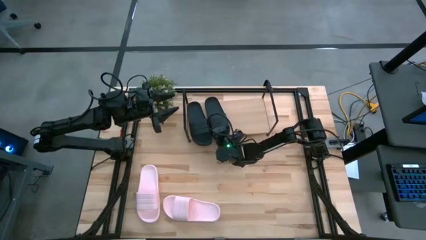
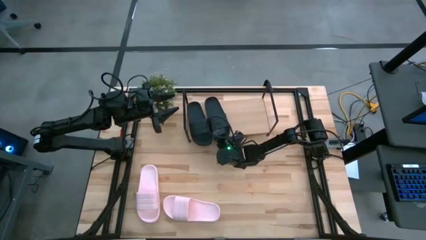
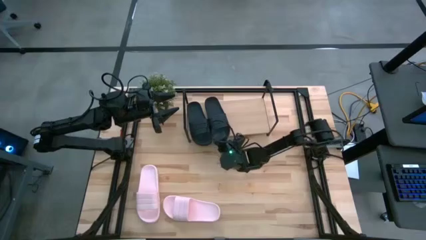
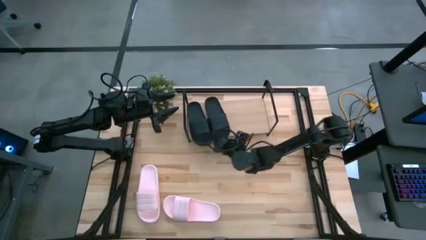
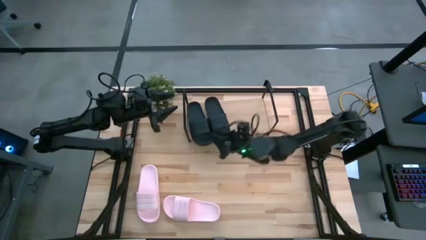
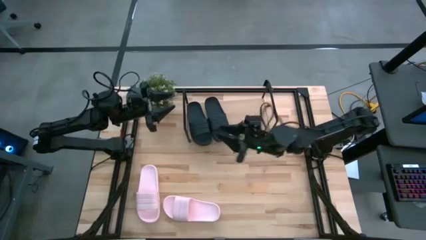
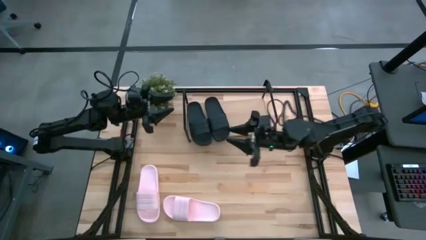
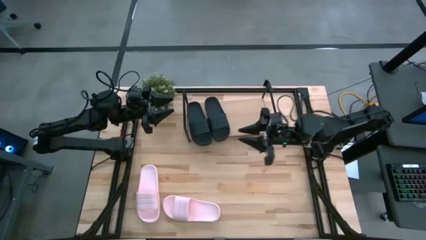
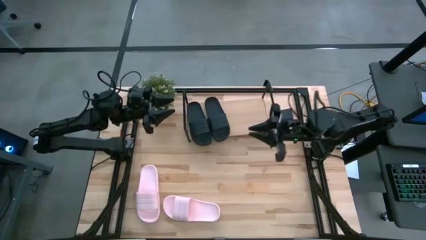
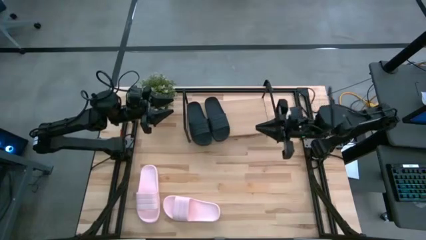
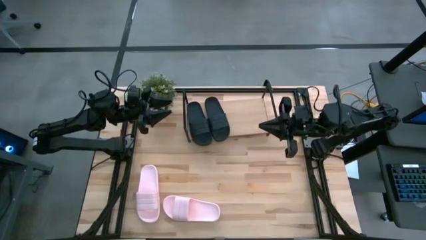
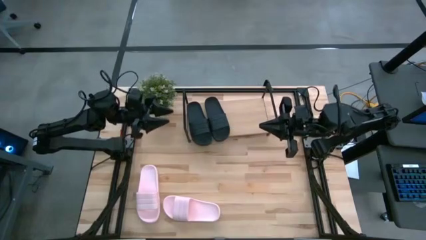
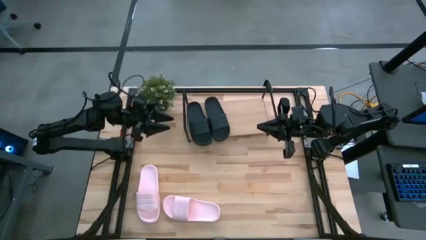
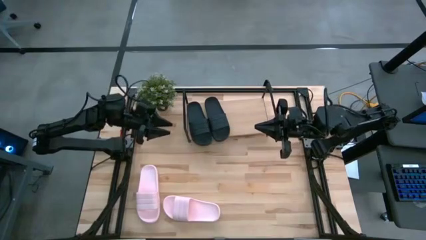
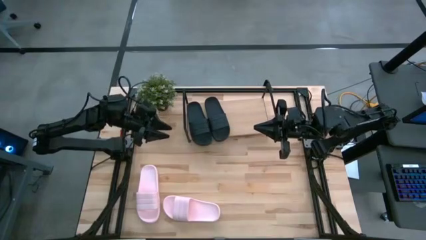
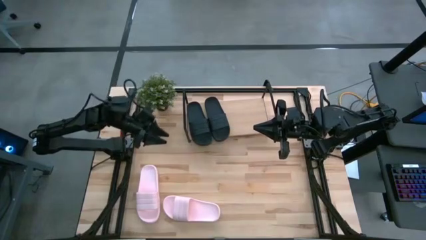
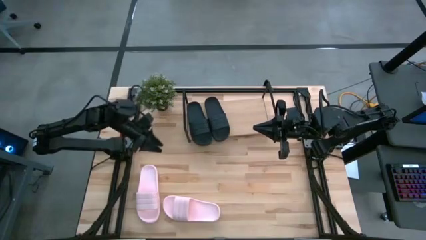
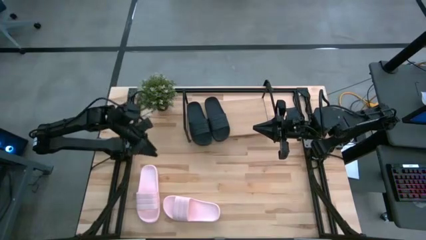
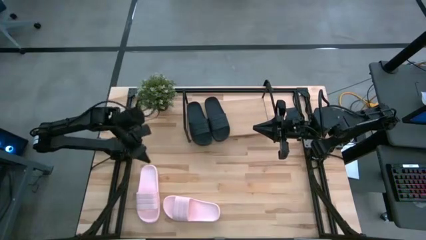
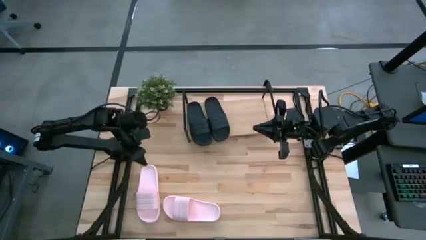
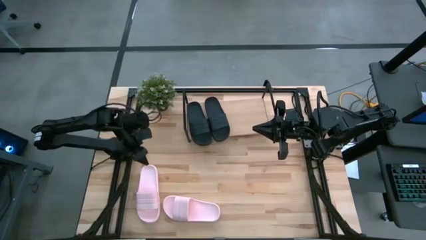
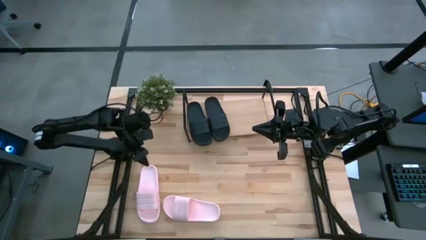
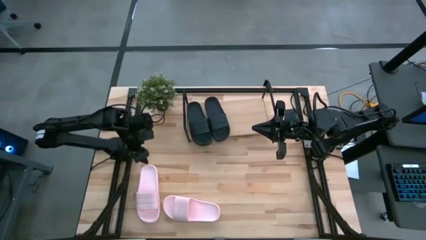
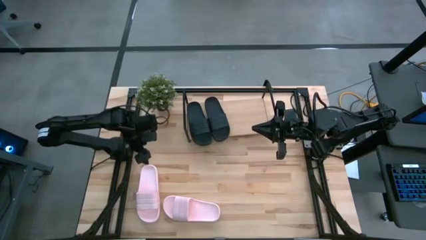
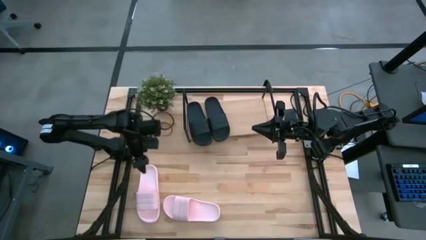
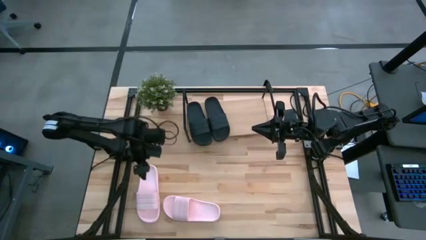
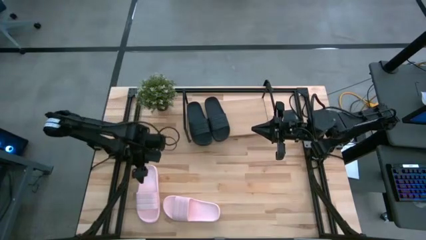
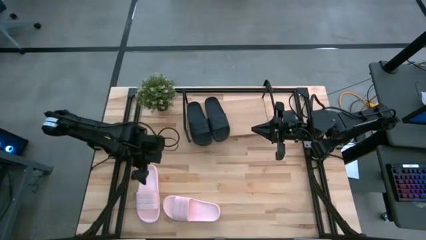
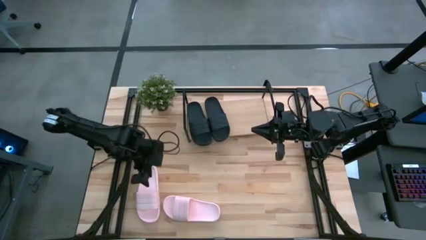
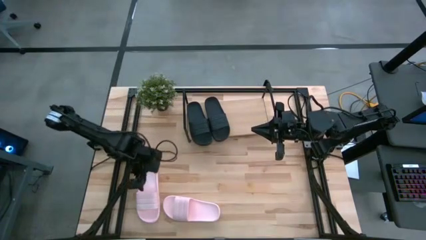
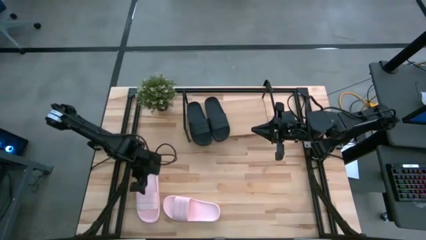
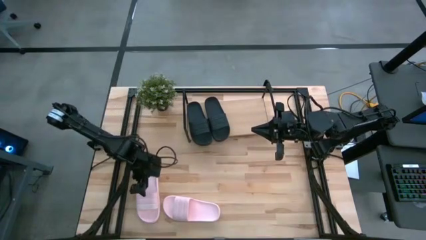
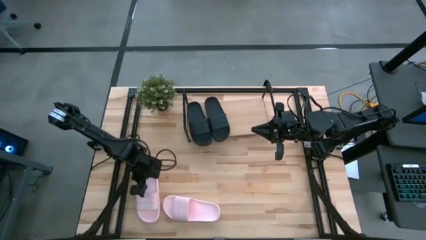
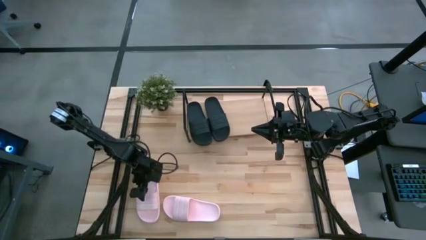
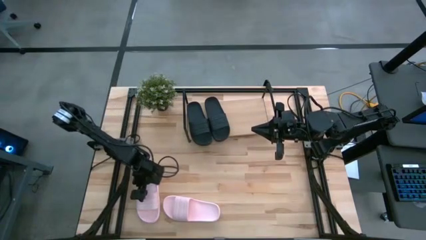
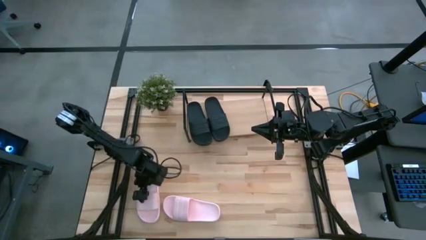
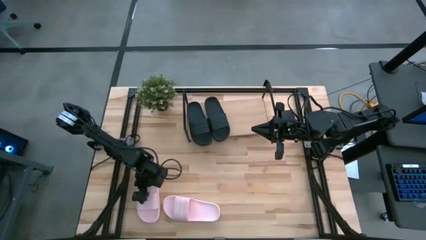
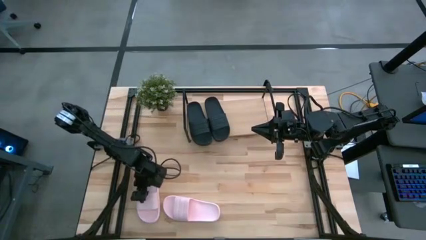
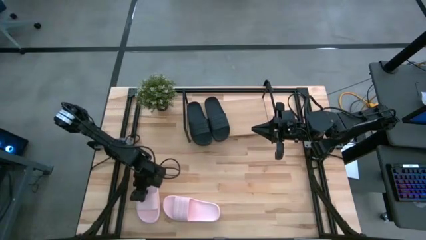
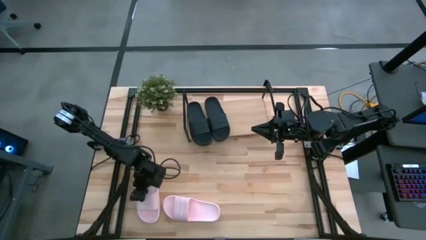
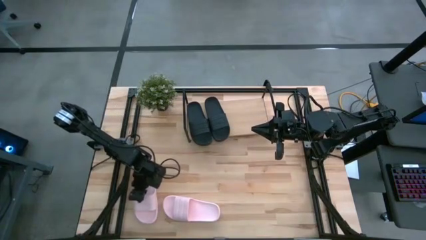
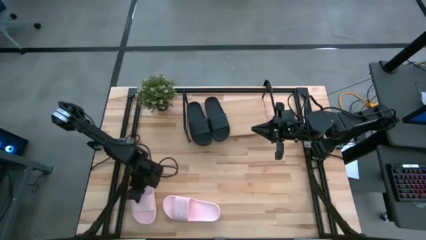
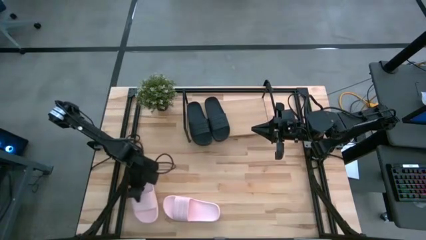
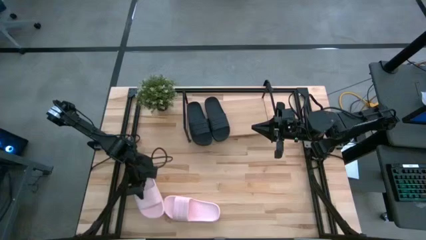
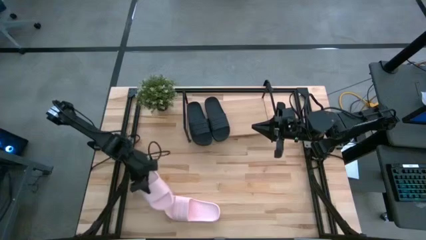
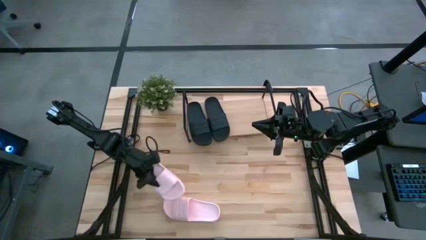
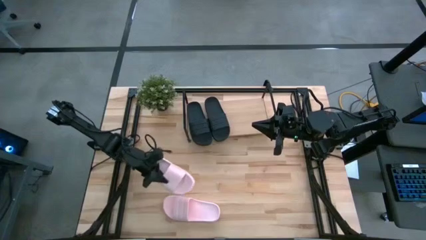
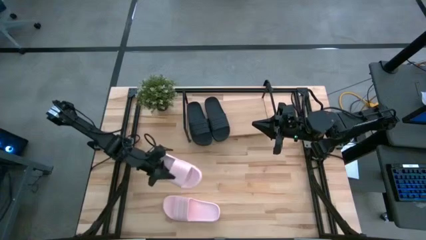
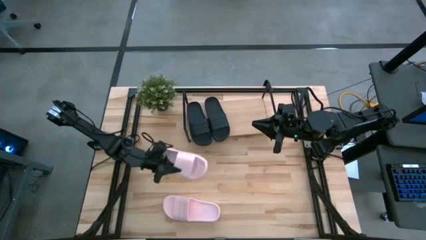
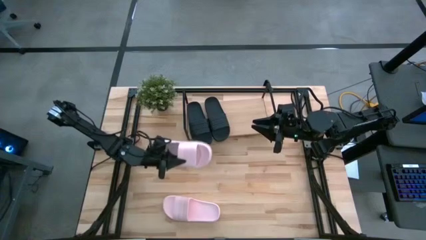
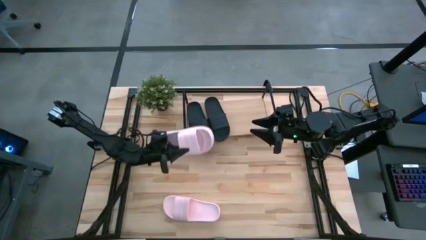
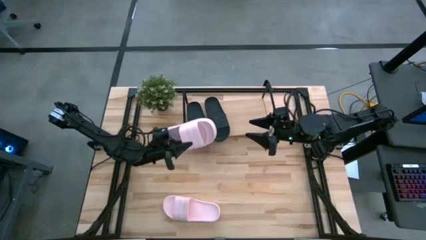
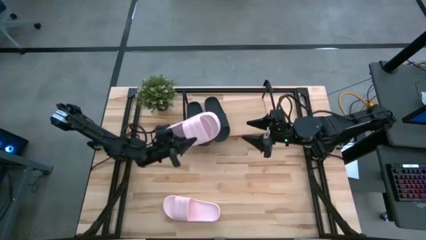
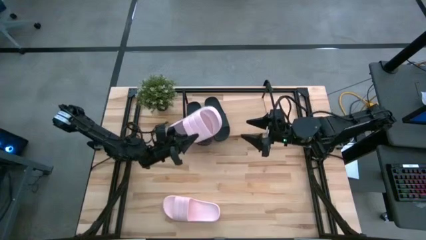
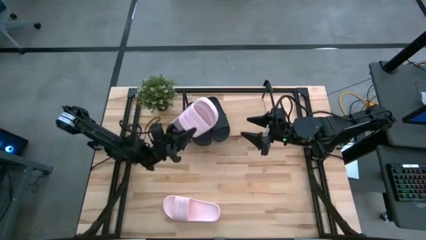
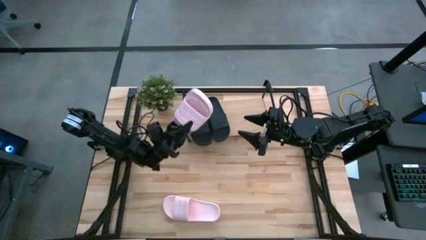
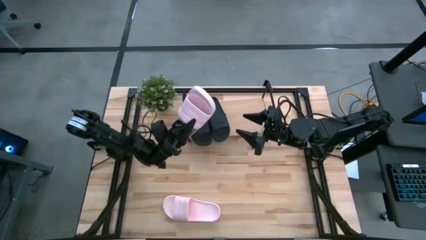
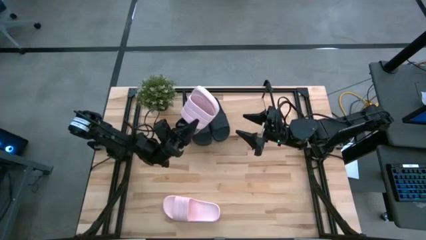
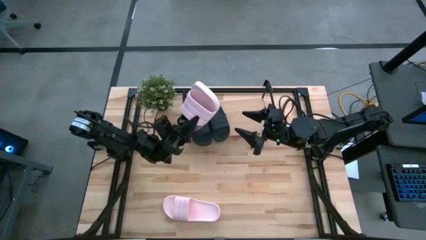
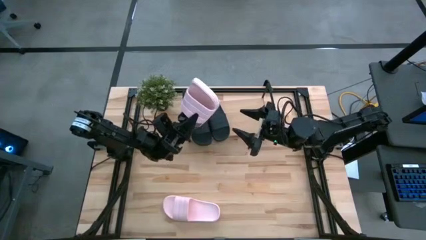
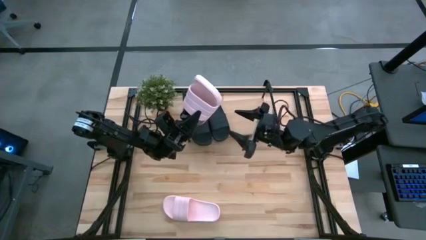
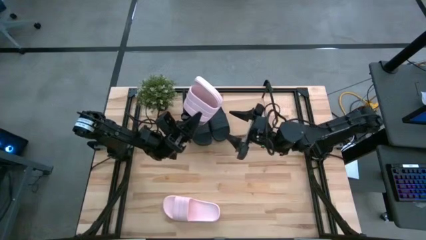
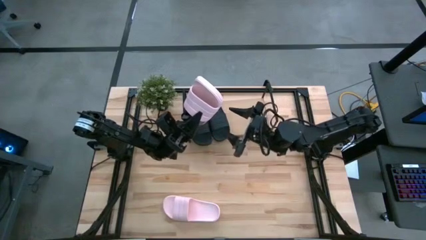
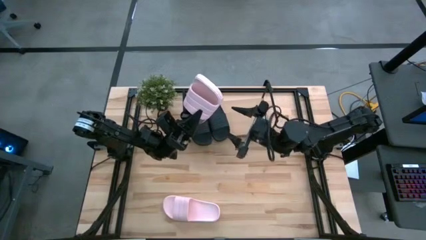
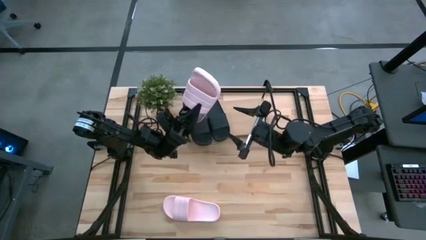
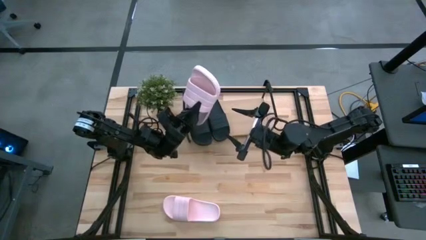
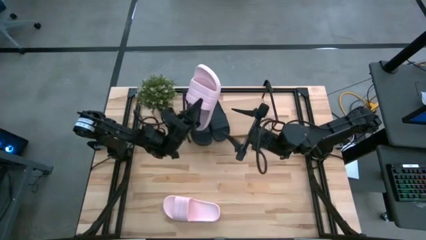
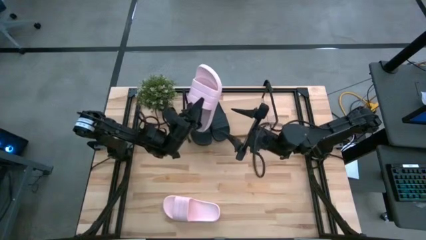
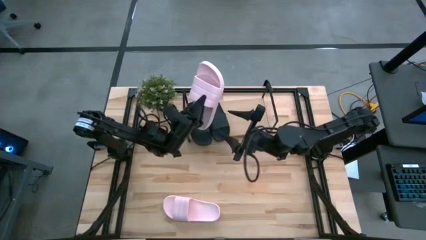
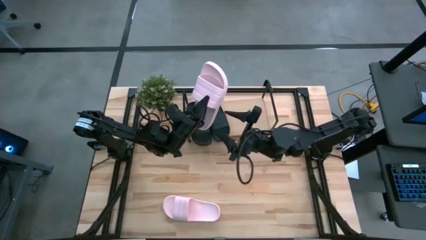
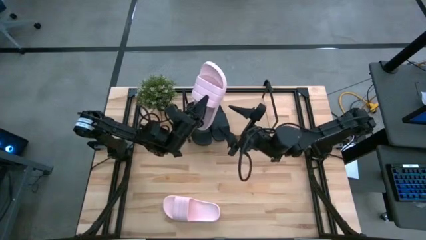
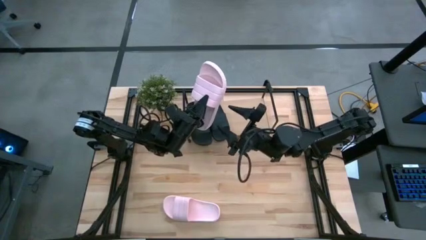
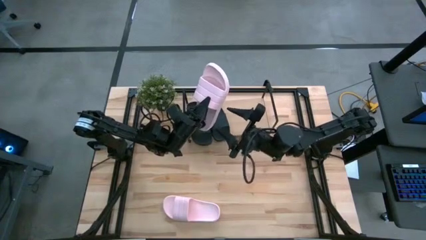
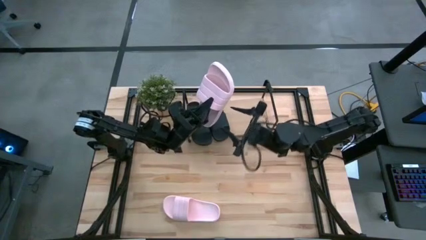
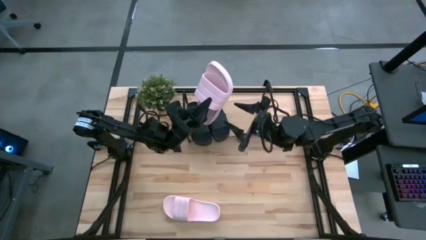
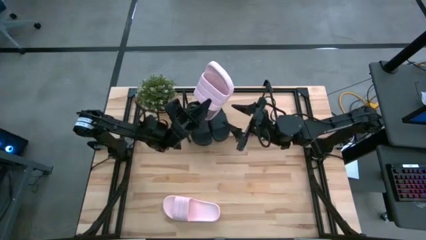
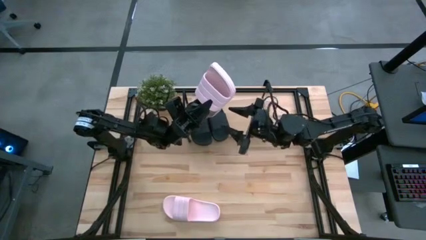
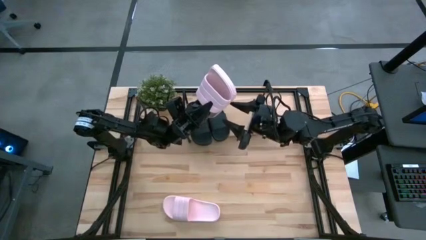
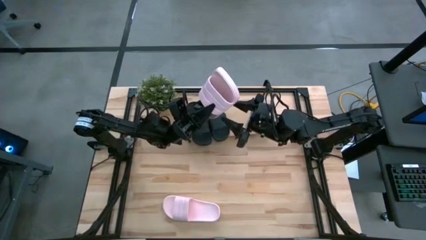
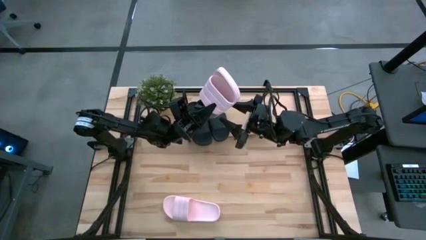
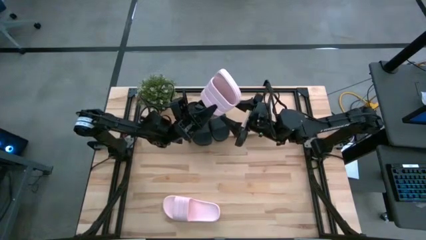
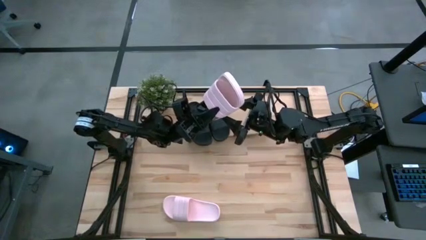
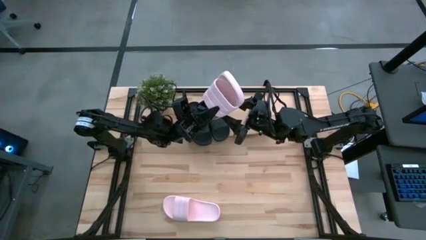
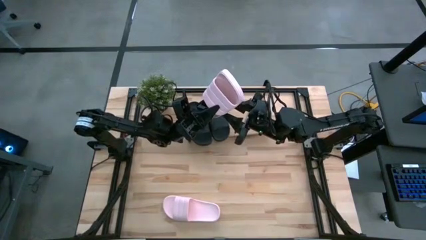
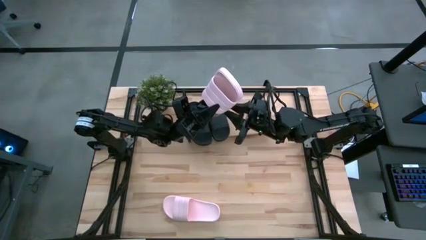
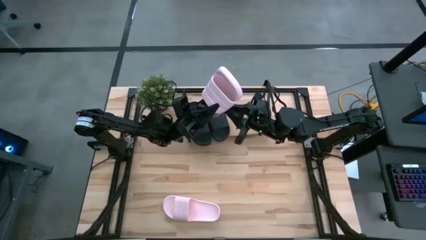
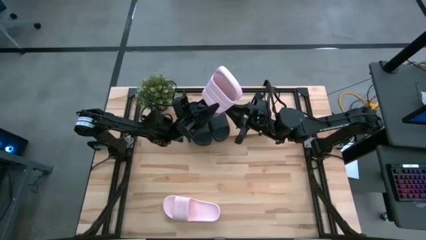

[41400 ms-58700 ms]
Task: Pick and place slides into the shelf
Put the left pink slipper on the shelf
